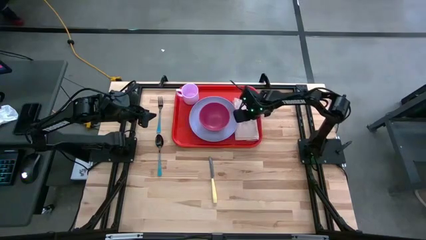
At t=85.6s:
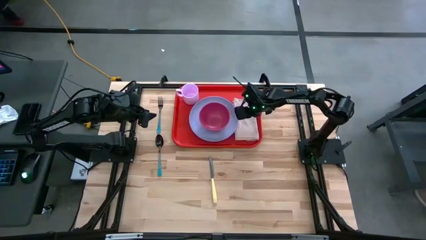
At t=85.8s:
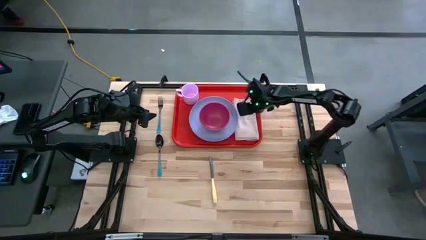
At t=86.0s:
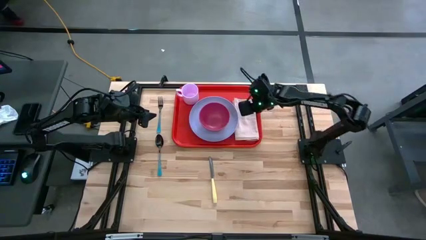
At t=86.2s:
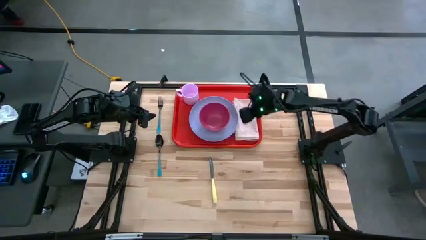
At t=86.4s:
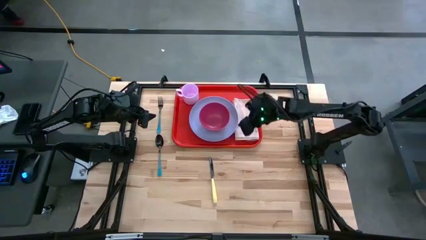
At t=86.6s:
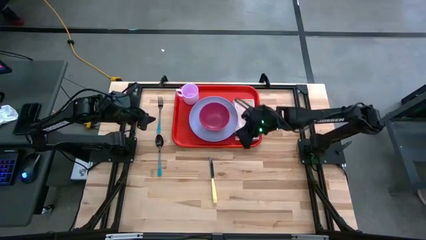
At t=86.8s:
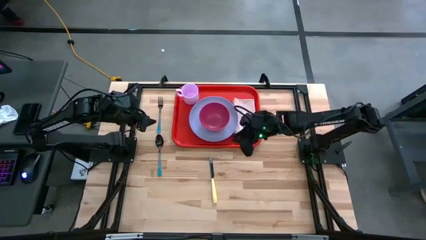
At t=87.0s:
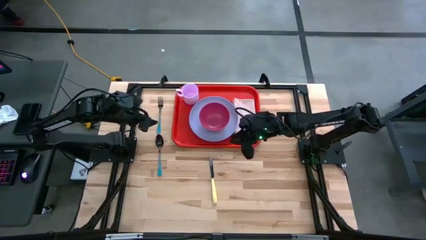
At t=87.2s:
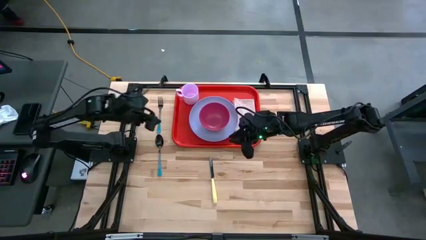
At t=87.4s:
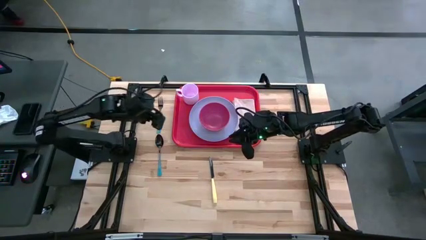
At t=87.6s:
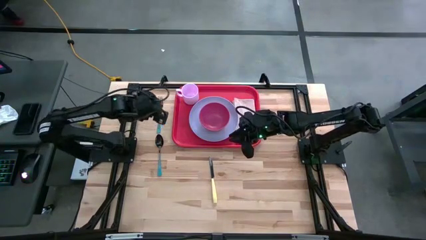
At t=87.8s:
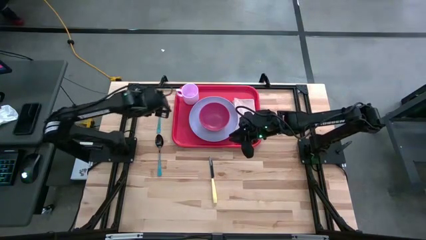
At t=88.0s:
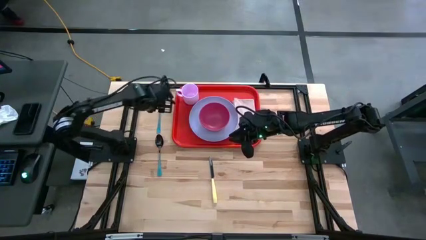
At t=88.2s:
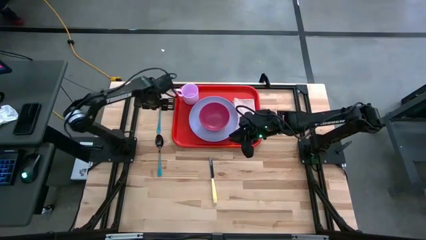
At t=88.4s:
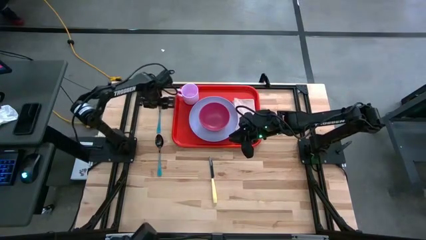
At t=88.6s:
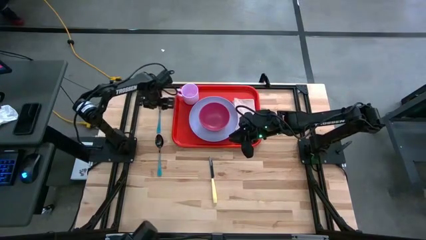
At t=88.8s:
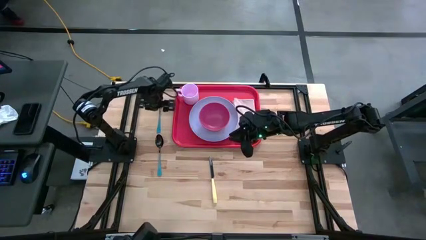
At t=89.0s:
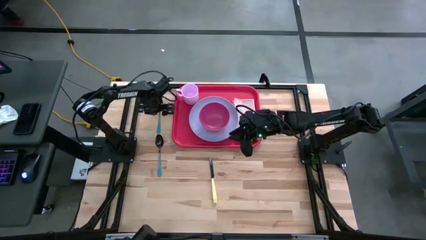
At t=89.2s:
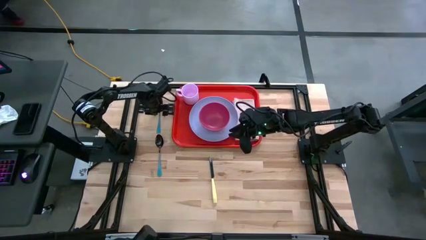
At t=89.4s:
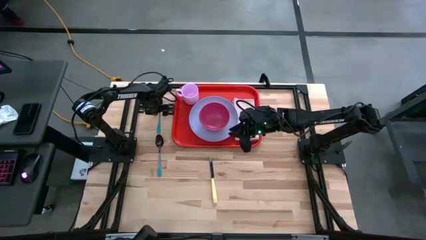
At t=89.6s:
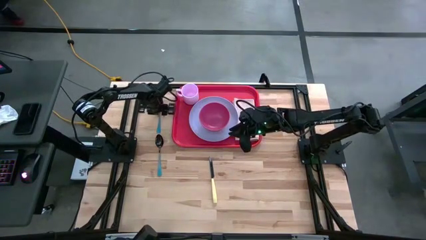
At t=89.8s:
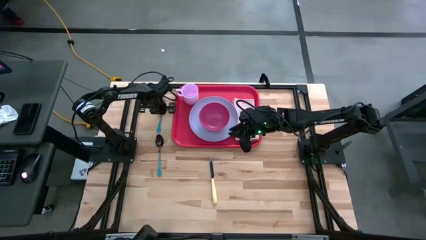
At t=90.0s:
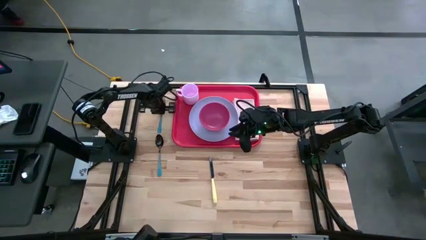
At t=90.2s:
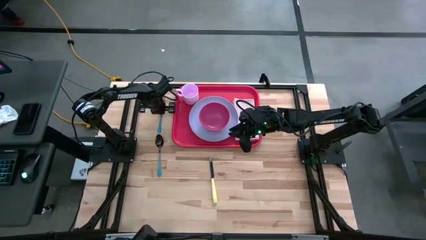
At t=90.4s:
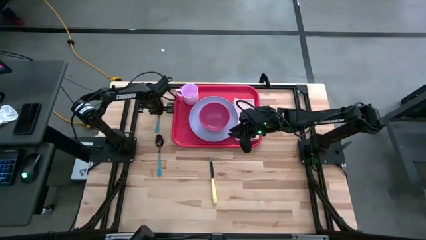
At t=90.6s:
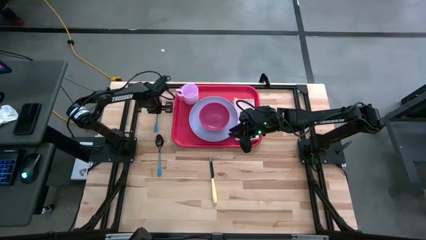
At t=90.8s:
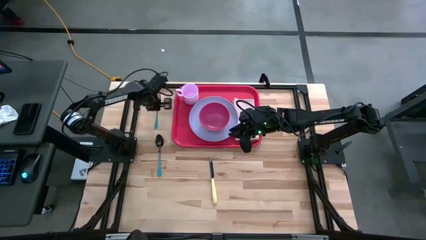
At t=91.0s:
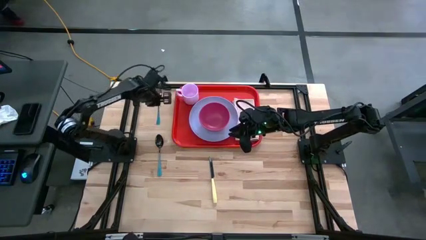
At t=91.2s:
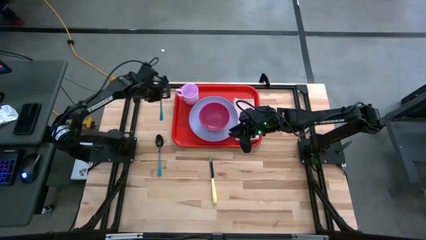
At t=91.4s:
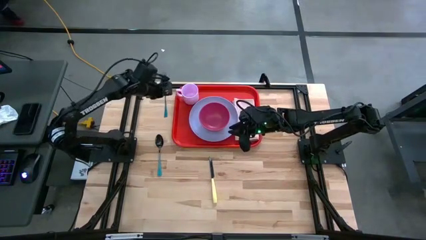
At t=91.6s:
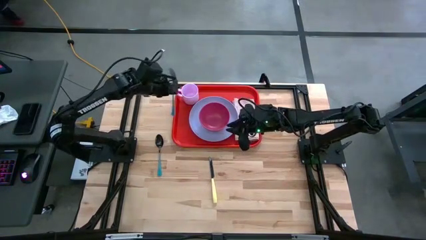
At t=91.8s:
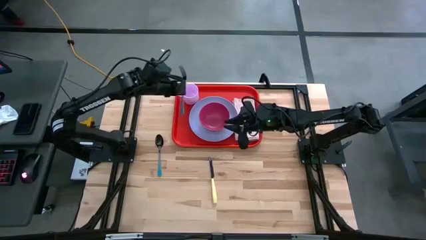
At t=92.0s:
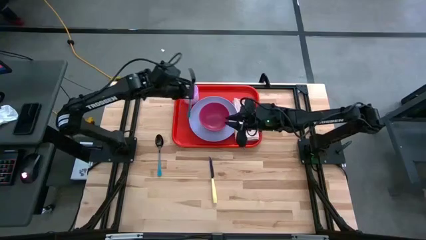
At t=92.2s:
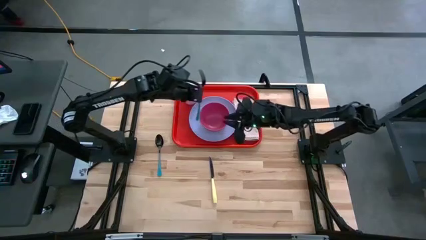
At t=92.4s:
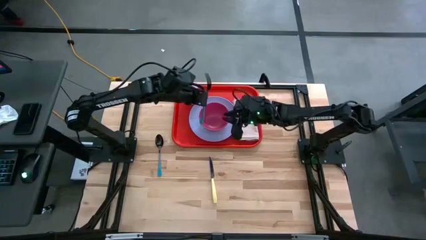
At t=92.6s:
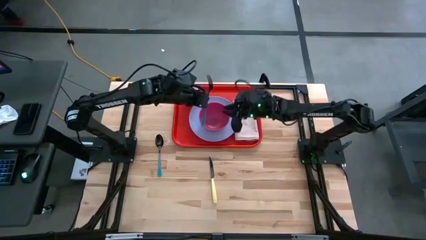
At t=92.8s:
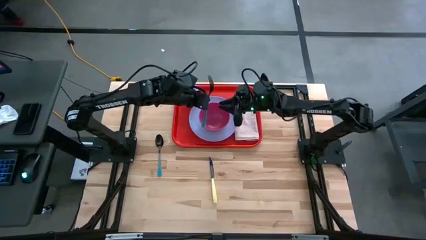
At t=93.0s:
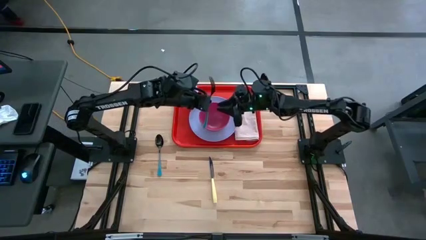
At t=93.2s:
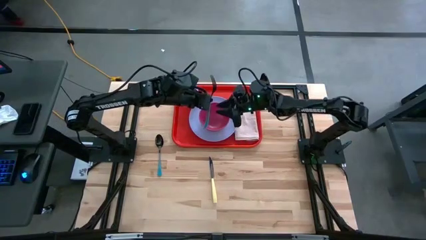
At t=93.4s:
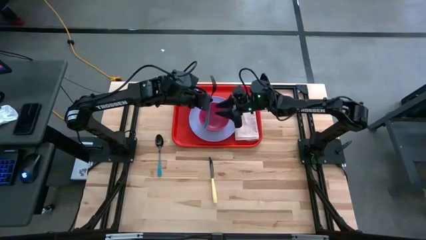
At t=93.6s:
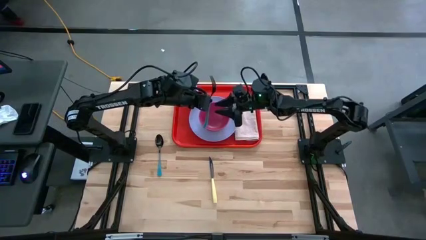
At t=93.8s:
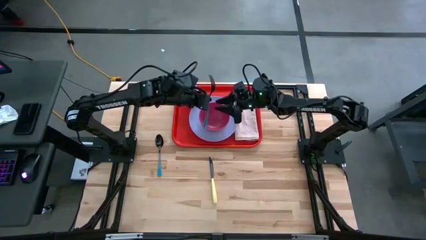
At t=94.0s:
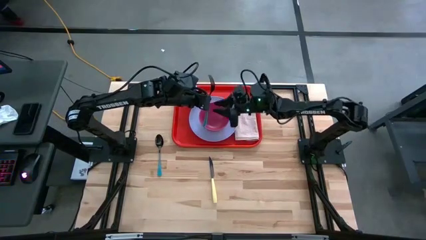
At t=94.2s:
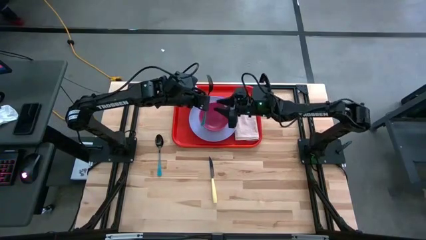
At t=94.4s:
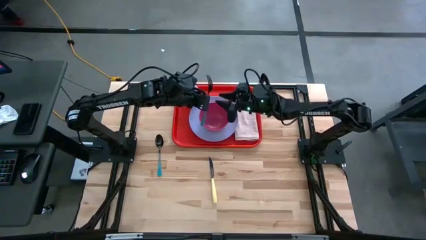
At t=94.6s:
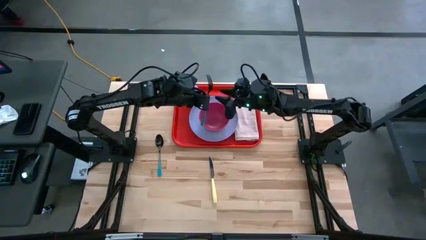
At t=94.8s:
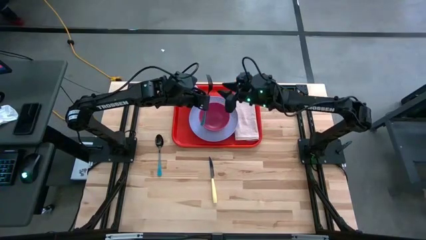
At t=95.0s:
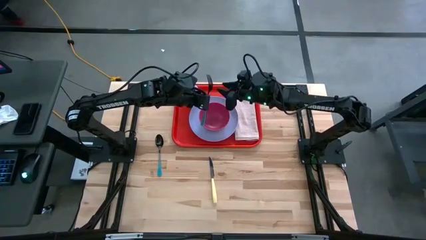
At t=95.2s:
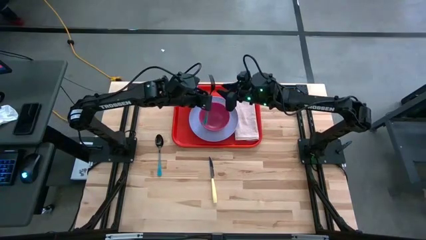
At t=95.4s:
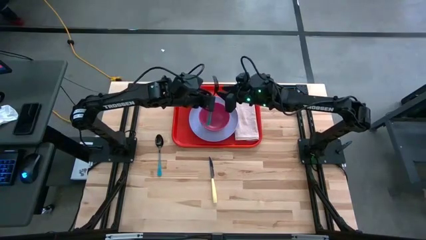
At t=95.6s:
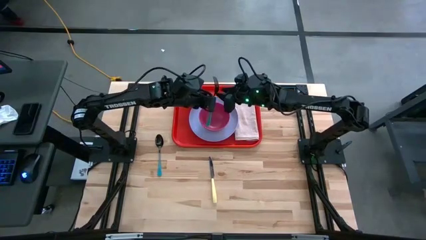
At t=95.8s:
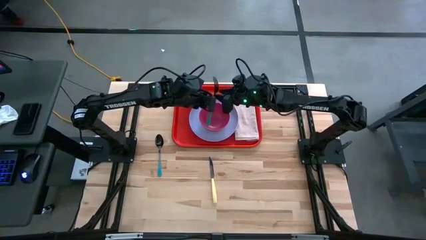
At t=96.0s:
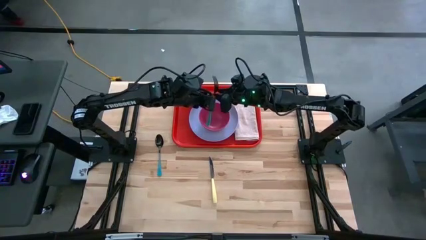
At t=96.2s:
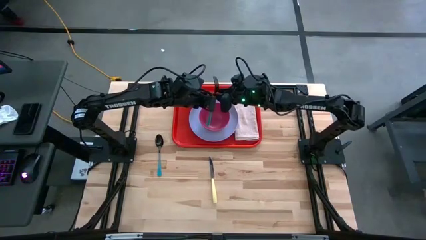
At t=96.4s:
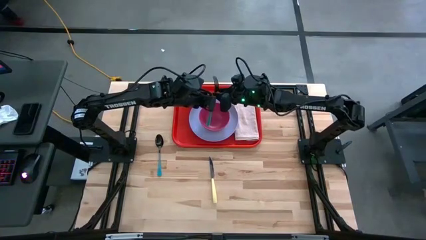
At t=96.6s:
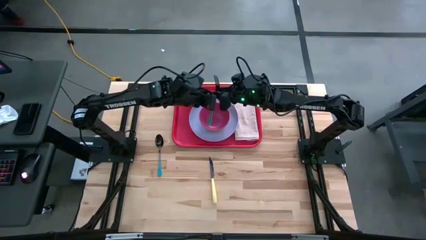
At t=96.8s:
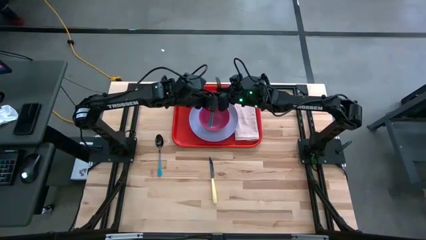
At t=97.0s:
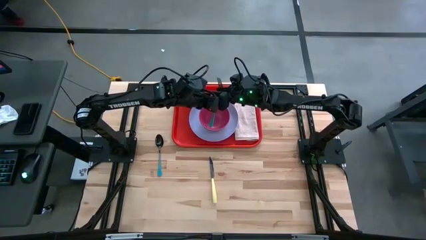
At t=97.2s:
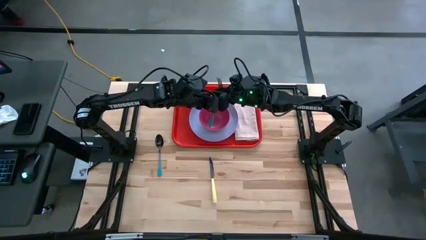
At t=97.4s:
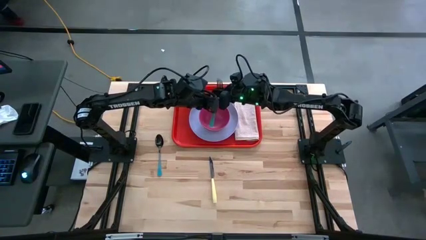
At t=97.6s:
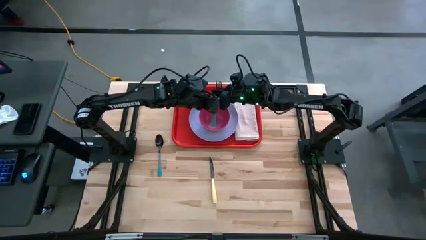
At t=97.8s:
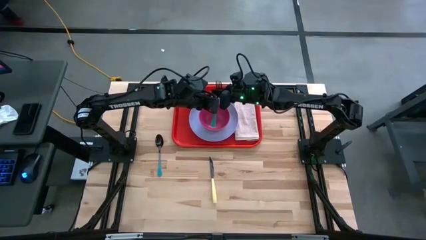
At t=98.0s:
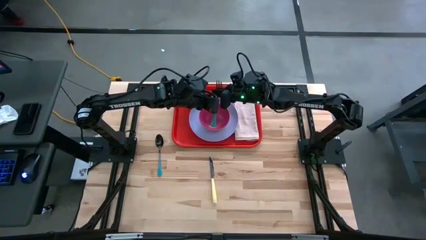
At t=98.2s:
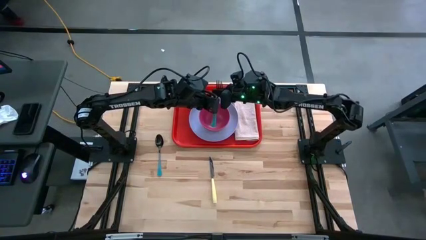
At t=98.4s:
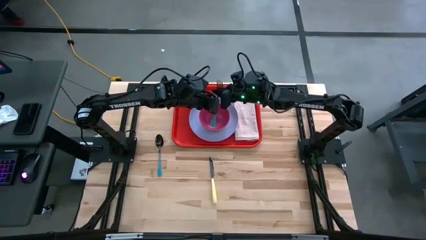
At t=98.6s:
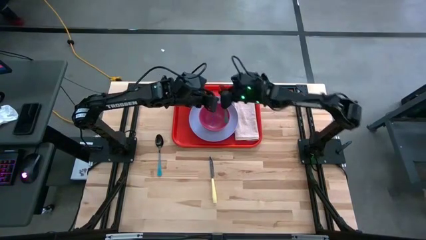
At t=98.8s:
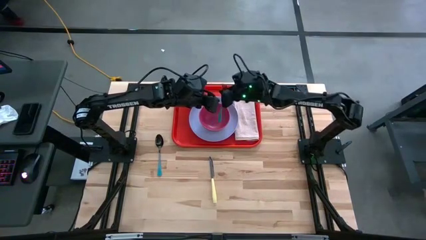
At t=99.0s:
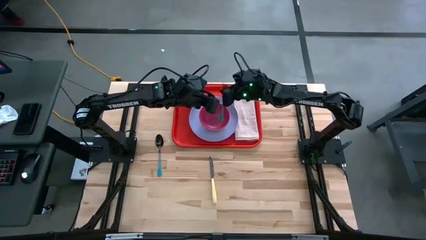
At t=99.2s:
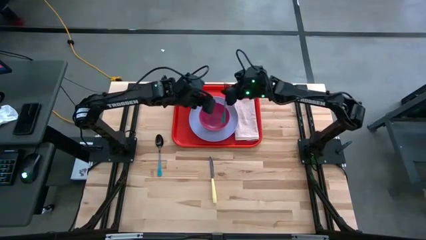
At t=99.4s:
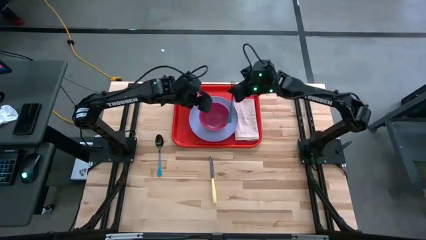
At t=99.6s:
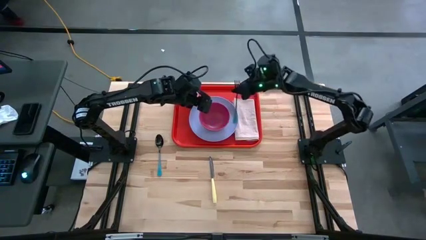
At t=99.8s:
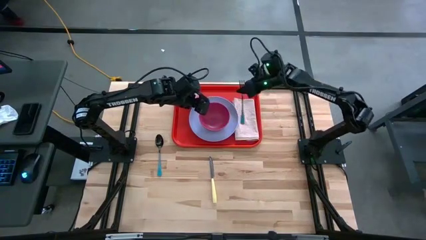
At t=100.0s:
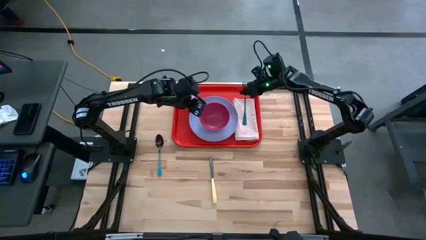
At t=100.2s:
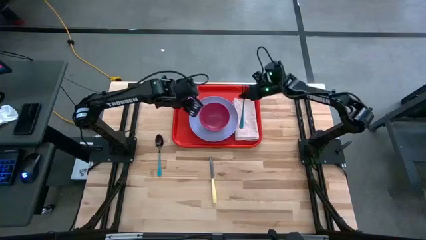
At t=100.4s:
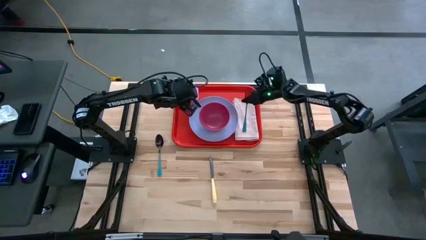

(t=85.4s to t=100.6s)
Task: Set up tray
Put the blue fork on the white napkin
